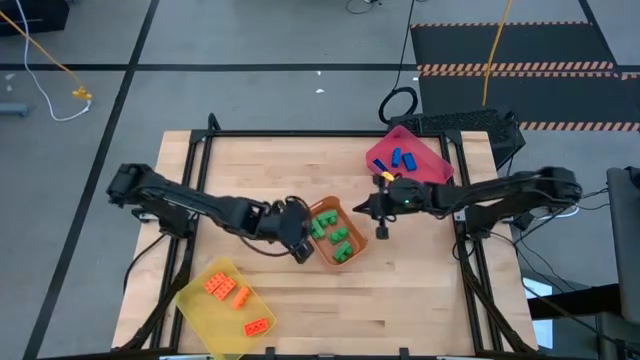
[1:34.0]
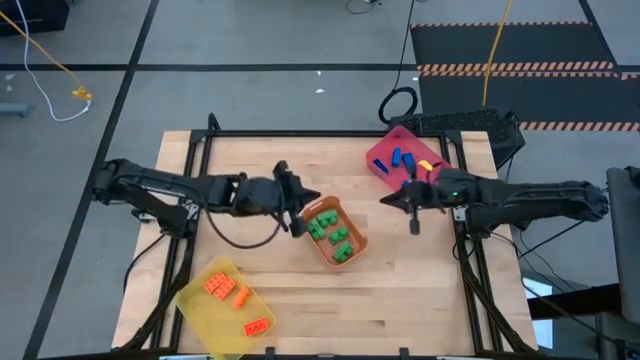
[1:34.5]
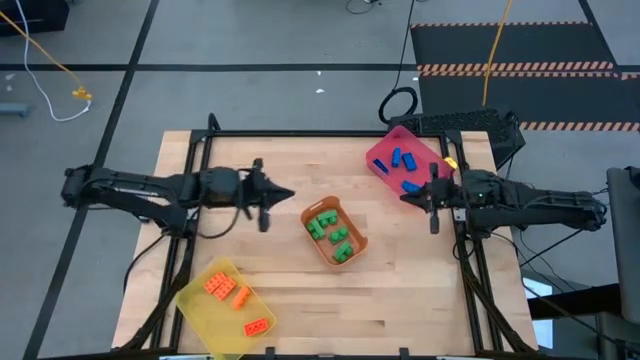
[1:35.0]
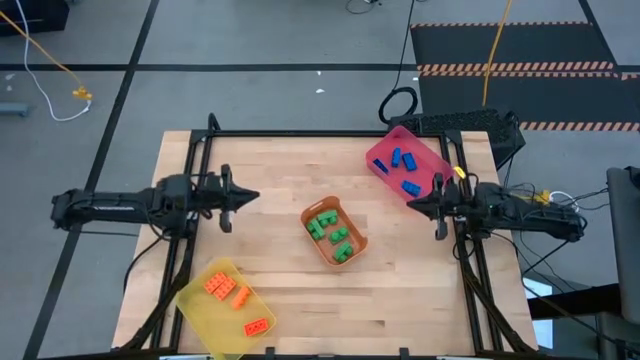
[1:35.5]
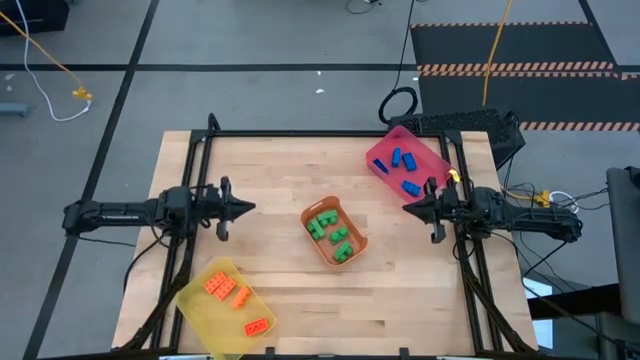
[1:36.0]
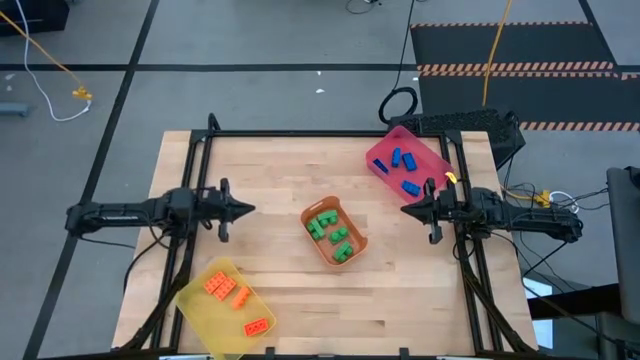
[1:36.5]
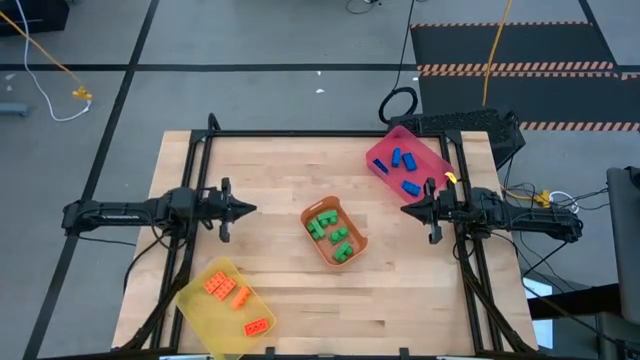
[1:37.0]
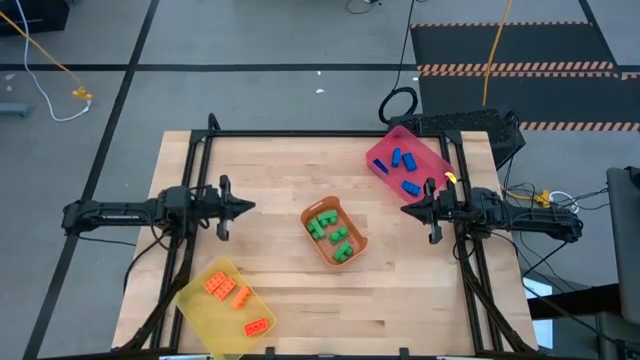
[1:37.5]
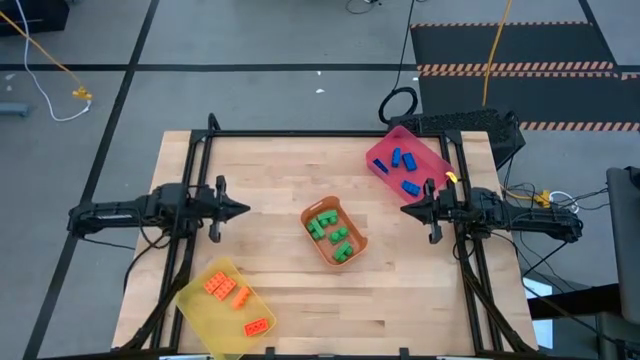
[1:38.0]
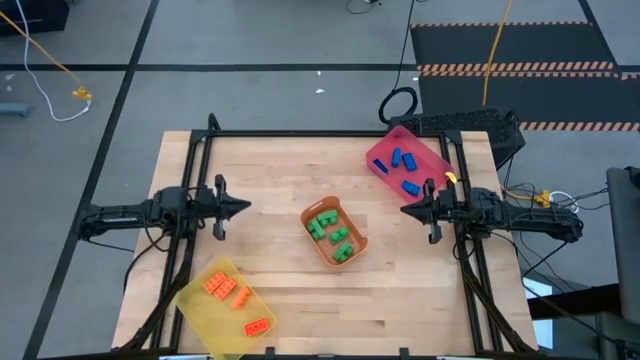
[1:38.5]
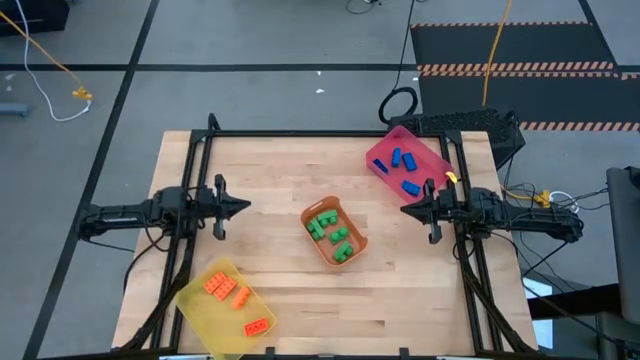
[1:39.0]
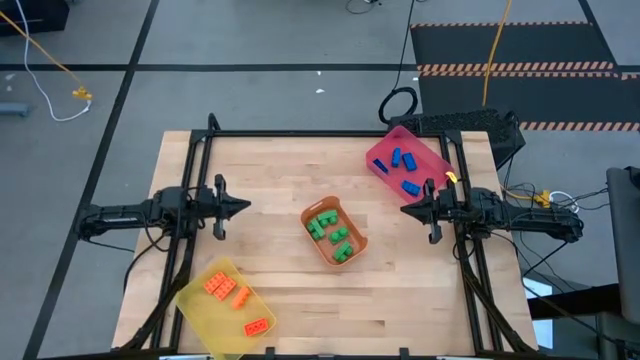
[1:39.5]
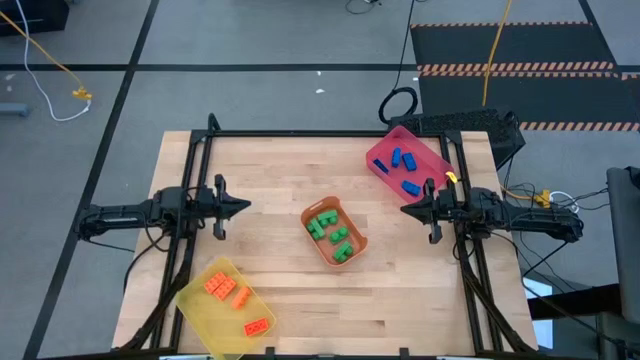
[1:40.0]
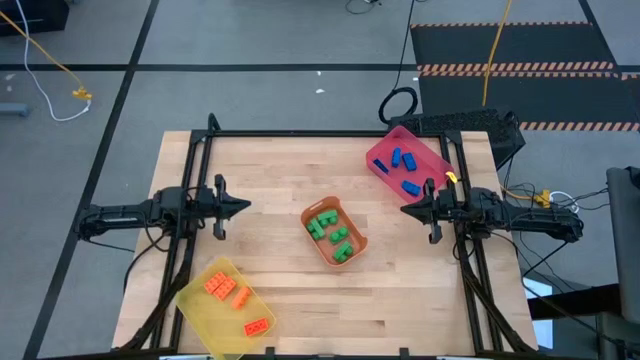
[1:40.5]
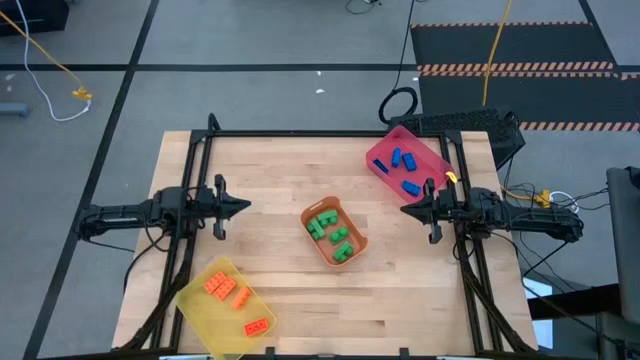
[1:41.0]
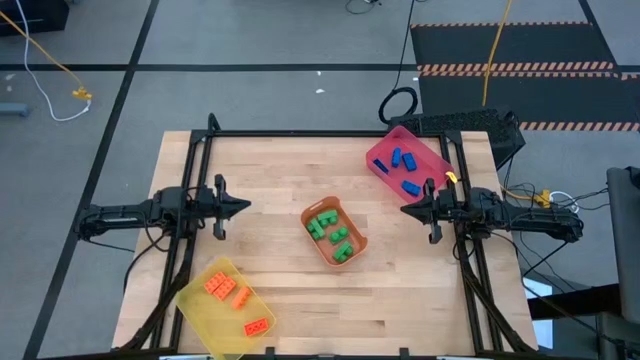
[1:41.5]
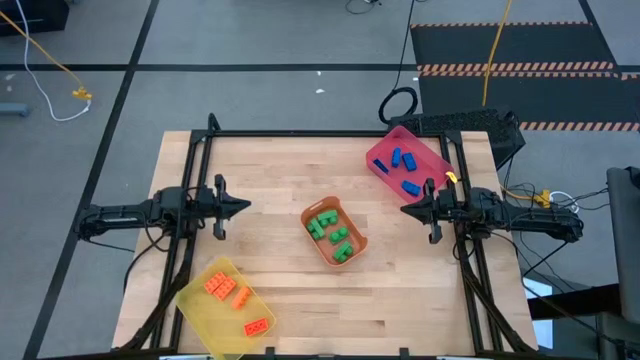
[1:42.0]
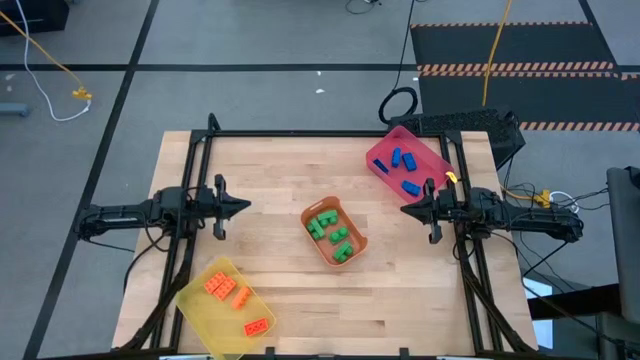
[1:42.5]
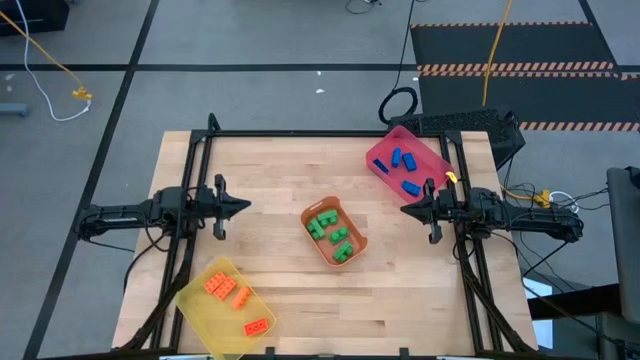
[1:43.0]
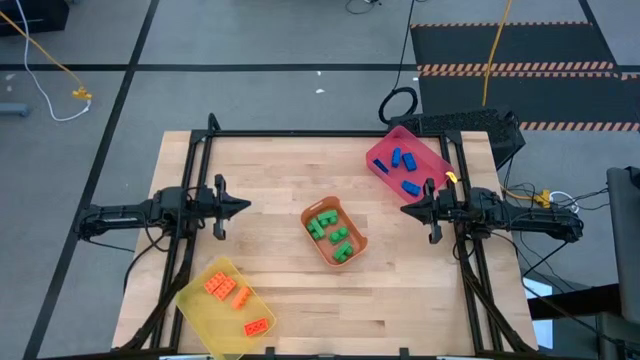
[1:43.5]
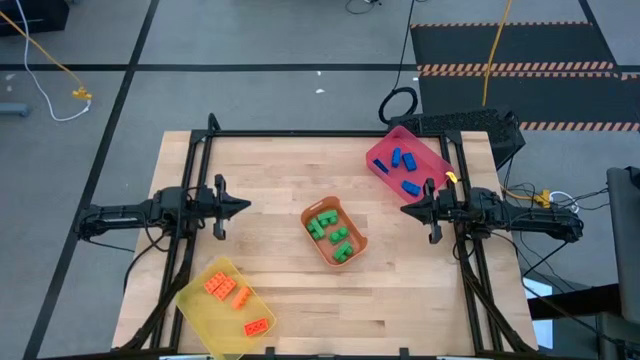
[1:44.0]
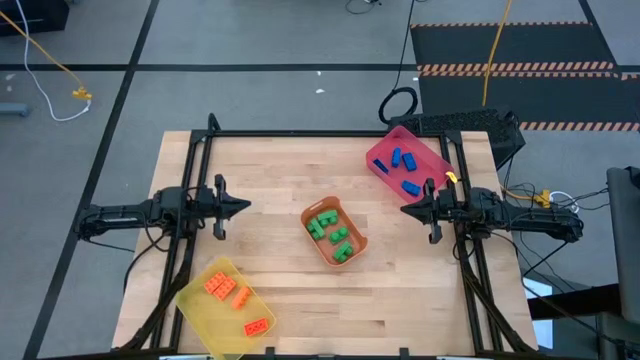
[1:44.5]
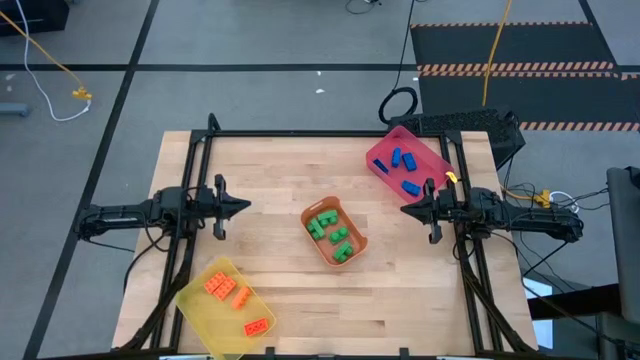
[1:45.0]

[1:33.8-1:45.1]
Task: Sort & place blocks by color
Return to Home Position

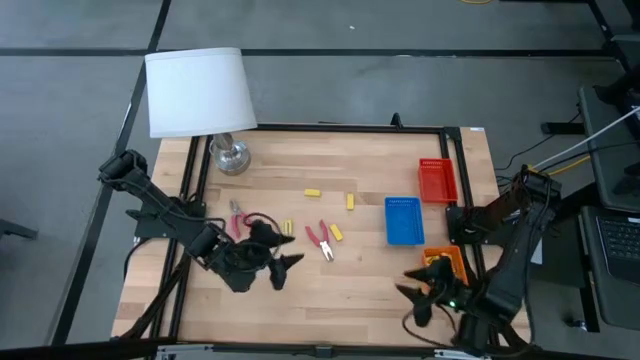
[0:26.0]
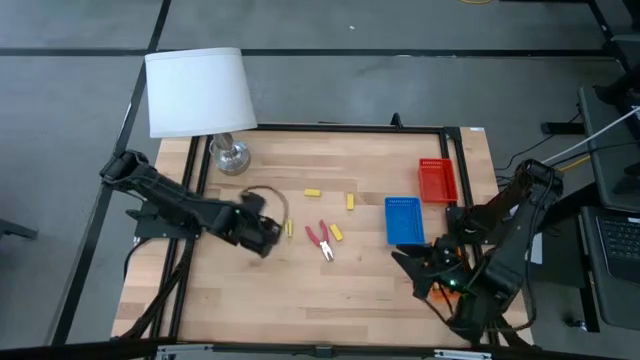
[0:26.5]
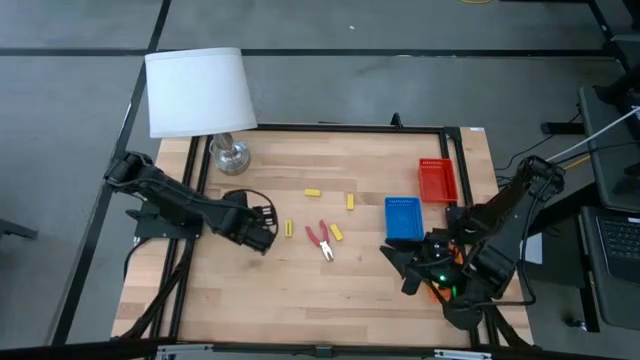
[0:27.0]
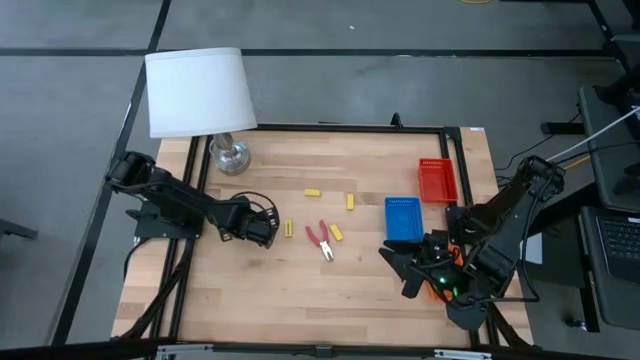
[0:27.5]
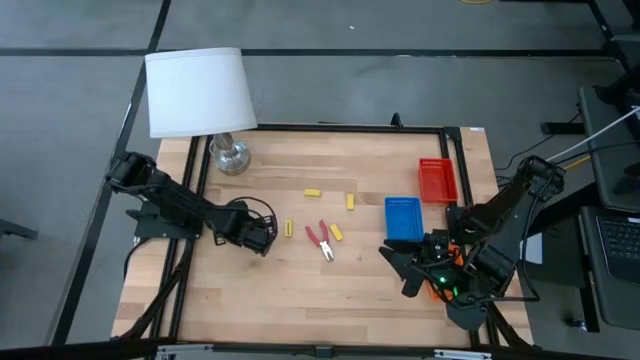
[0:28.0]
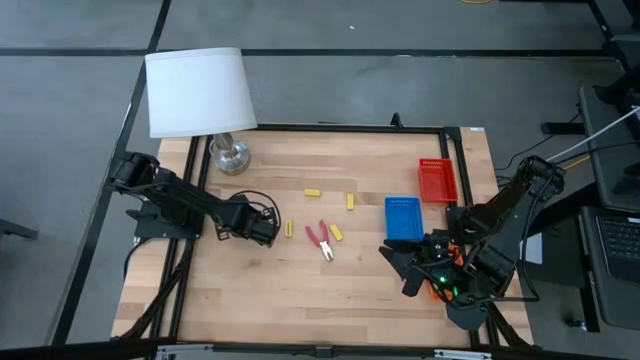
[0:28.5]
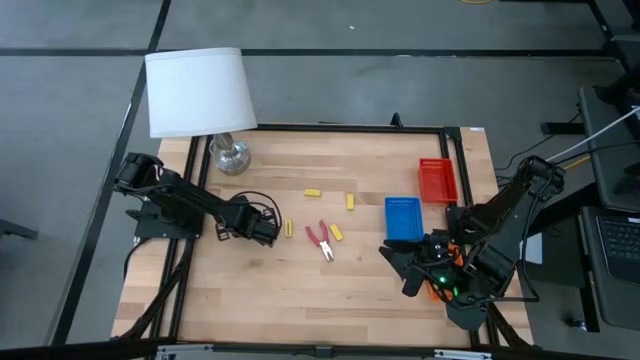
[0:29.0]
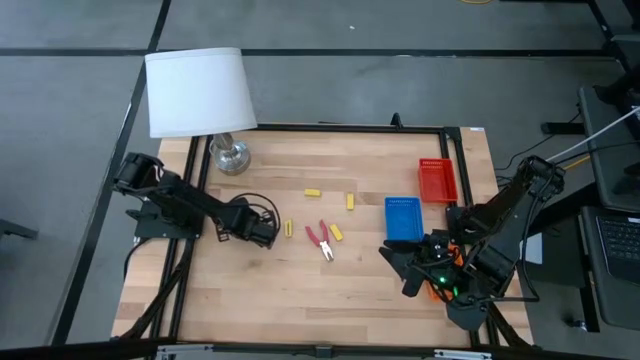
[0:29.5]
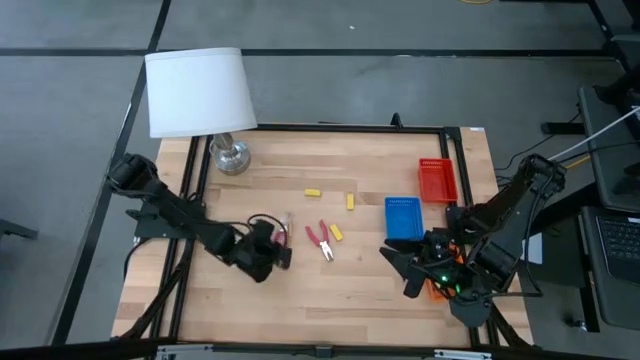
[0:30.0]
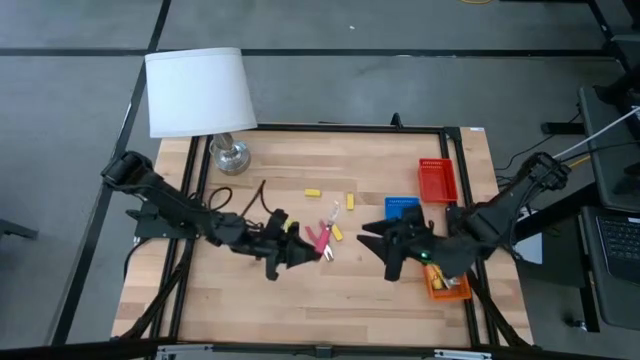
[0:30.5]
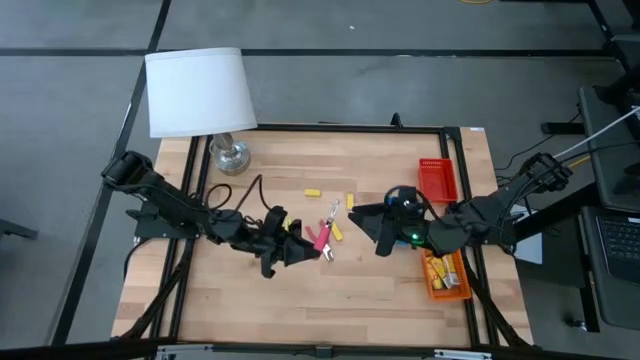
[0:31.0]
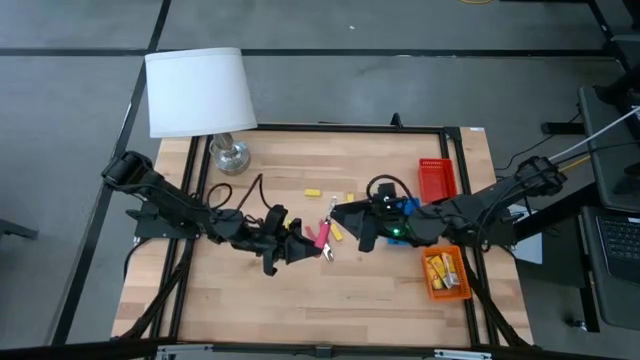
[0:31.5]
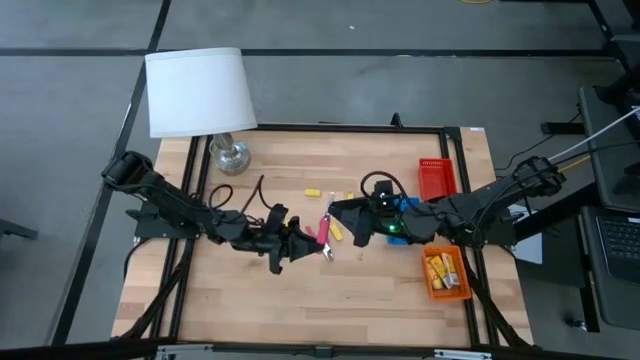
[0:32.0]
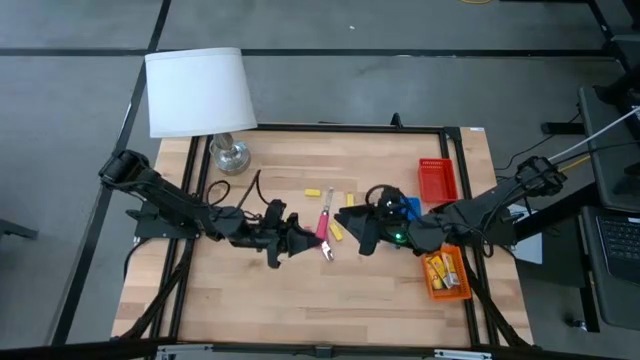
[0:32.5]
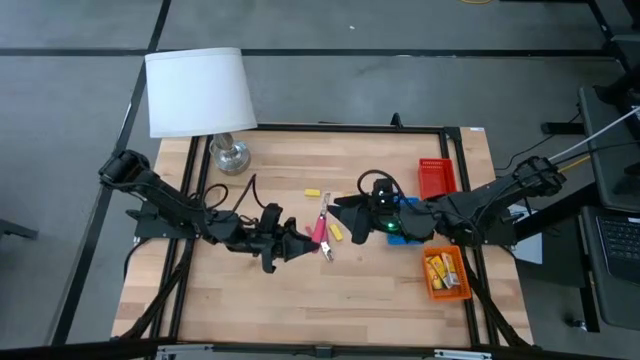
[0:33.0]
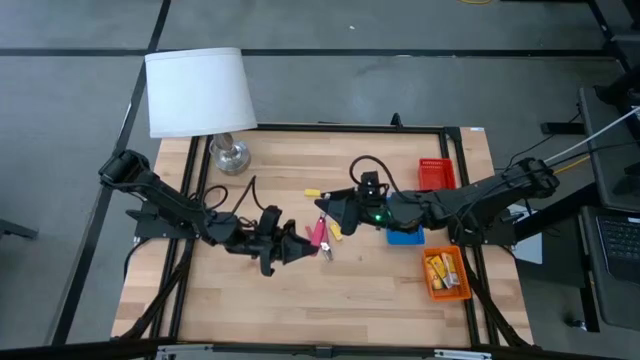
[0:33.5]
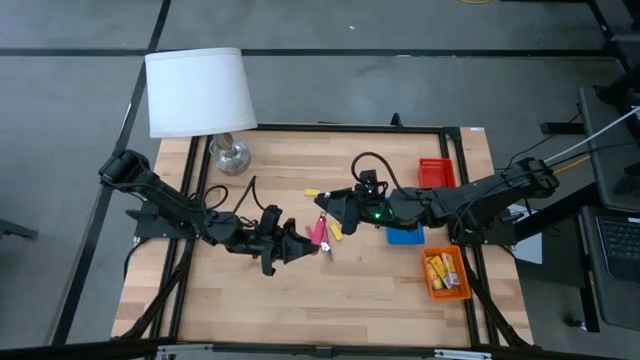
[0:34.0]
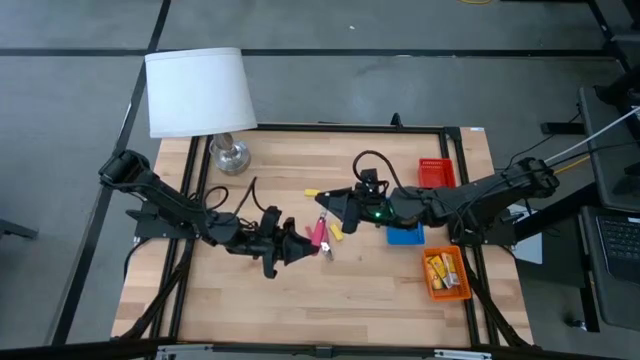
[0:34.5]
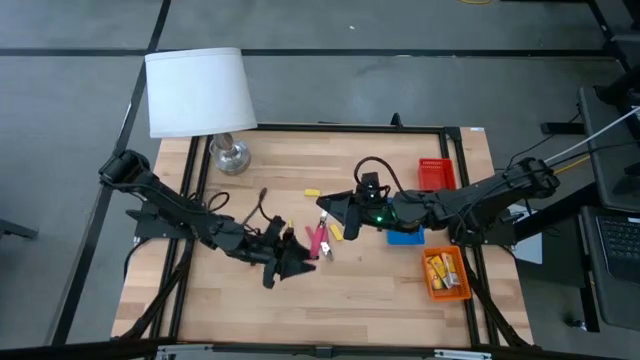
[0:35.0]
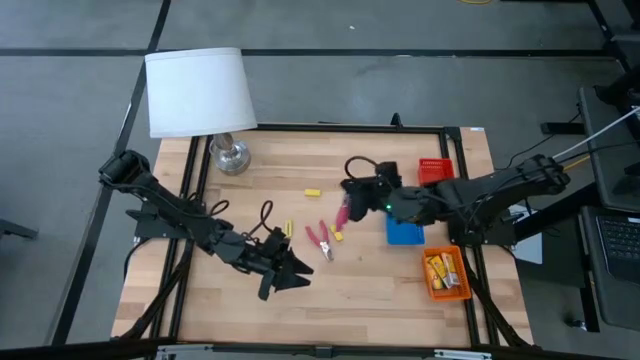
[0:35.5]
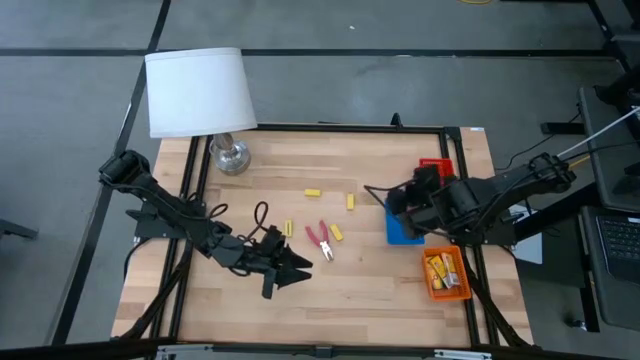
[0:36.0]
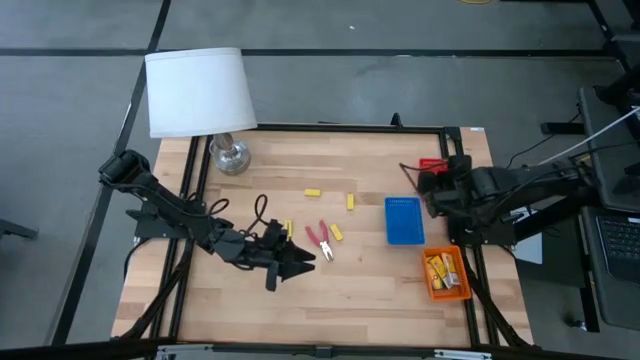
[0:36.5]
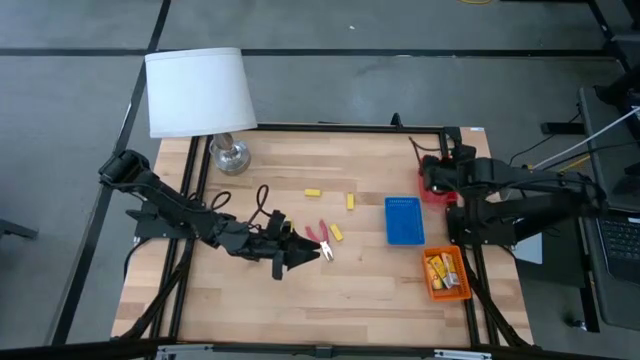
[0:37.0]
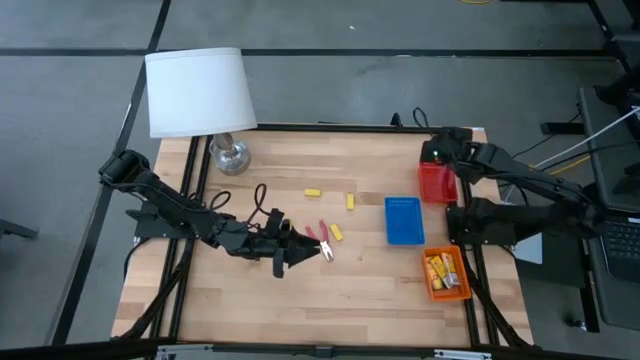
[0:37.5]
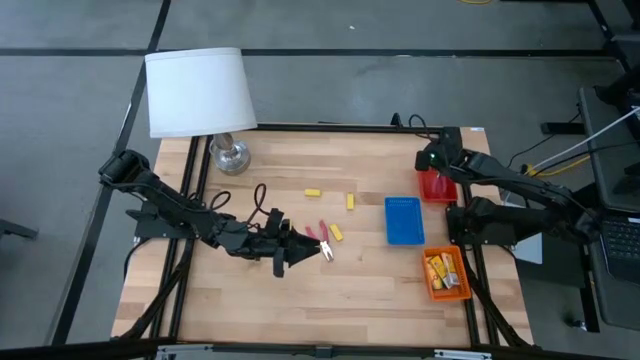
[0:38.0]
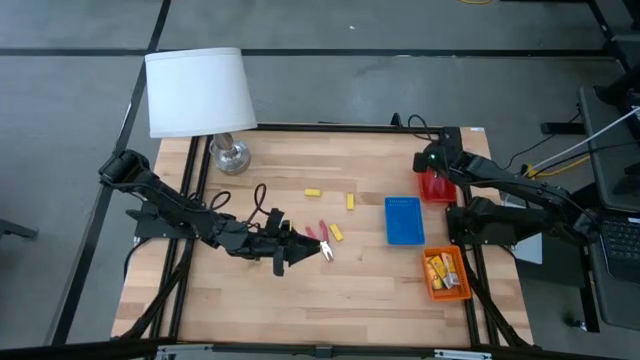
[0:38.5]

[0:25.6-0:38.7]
Task: Pick & Place School Supplies
Put the left pink hole puncher into the red bin
